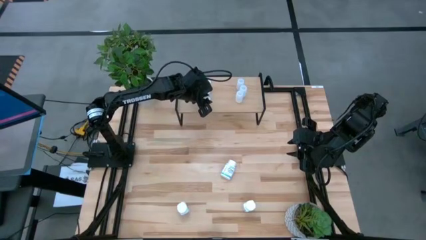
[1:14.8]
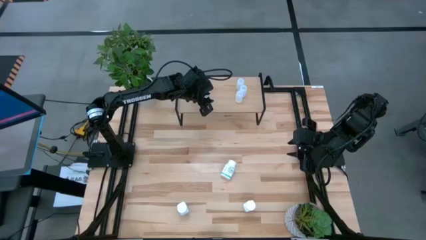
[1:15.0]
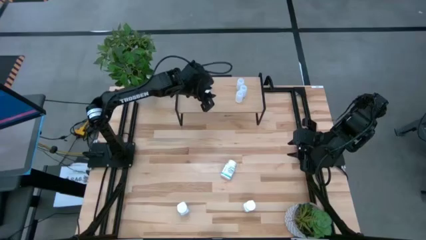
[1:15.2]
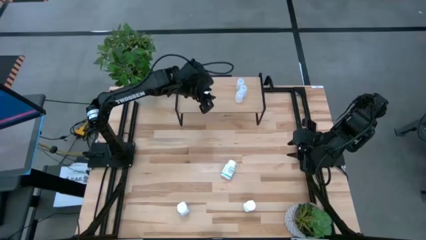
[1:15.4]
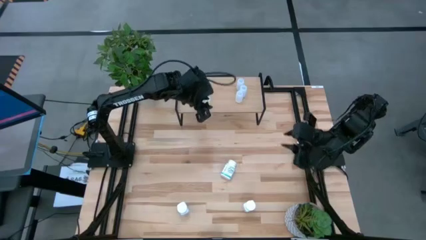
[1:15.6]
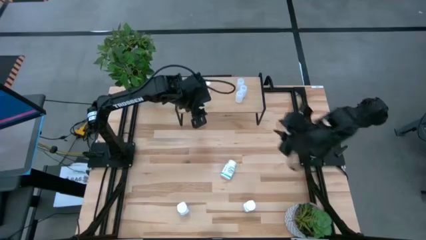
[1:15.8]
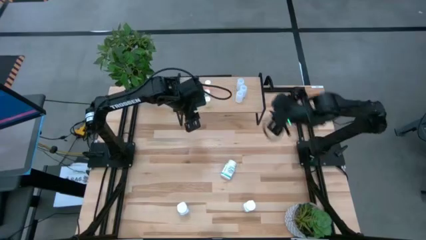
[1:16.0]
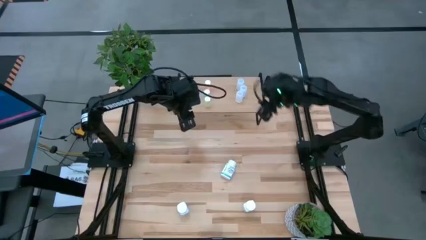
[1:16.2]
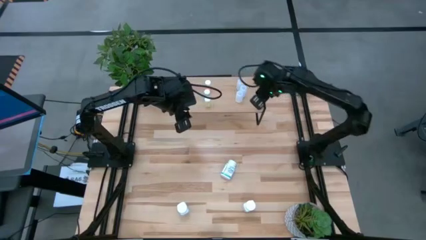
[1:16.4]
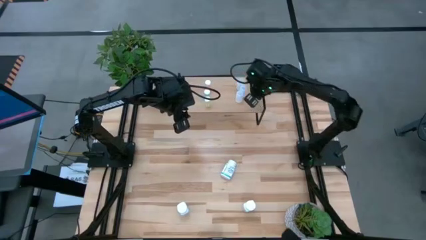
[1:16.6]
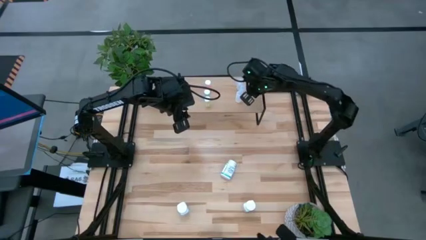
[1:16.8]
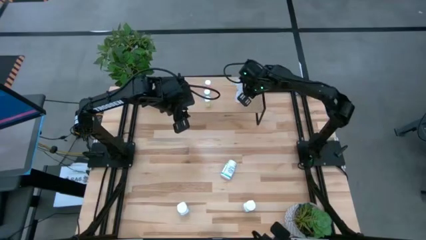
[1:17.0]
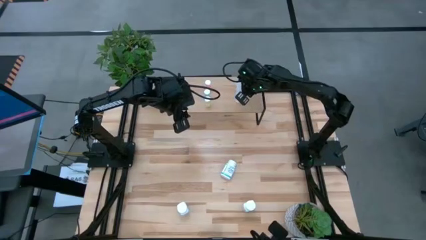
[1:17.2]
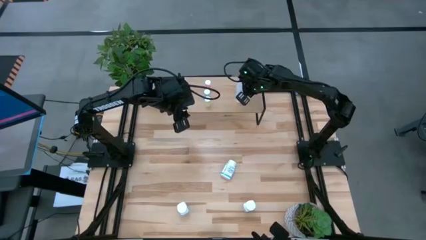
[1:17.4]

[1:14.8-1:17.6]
Task: Pick and place medicine bottles onto shelf by color
Adjust the white pill bottle on the shelf

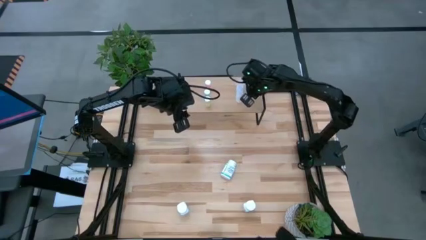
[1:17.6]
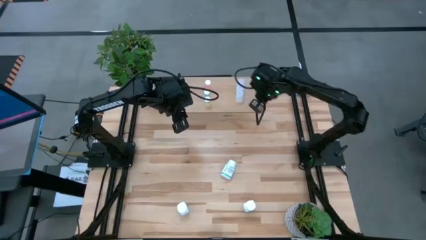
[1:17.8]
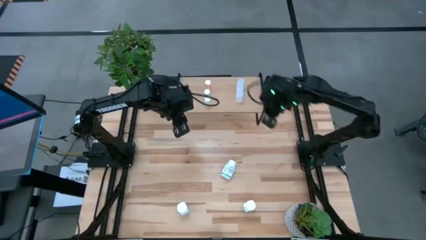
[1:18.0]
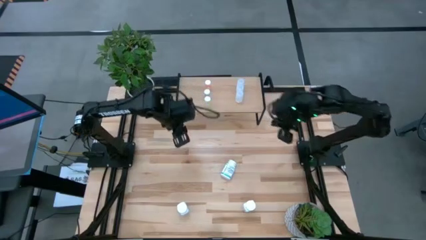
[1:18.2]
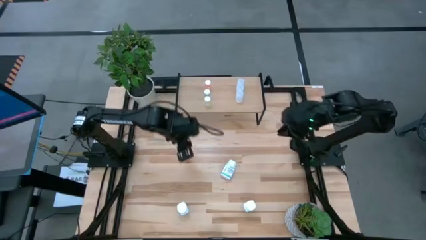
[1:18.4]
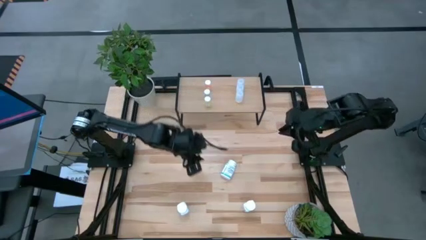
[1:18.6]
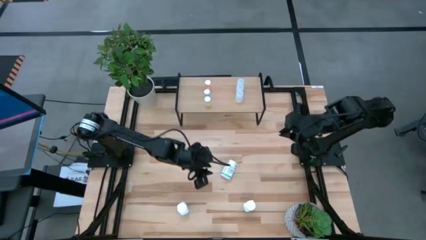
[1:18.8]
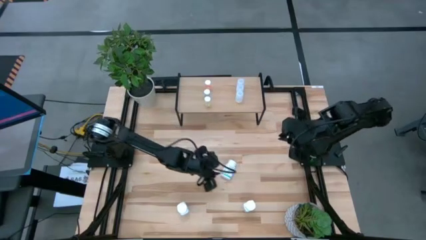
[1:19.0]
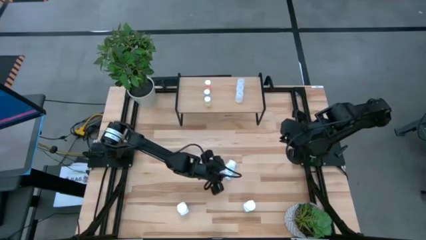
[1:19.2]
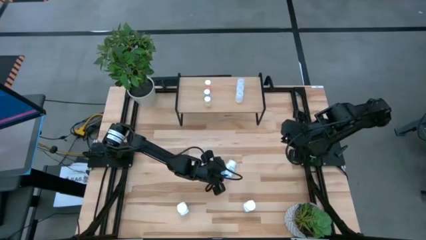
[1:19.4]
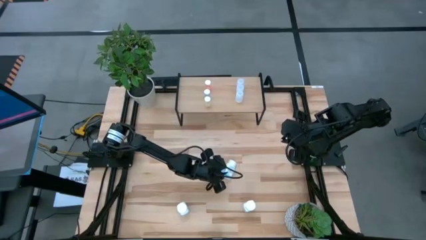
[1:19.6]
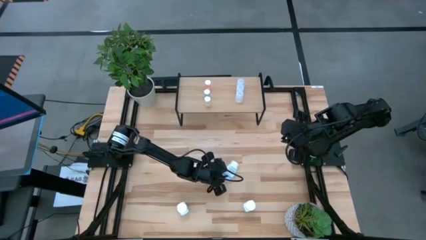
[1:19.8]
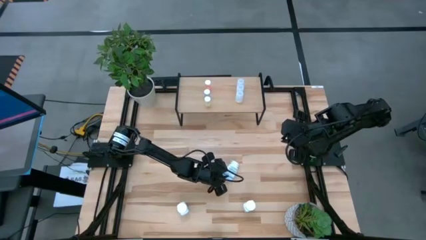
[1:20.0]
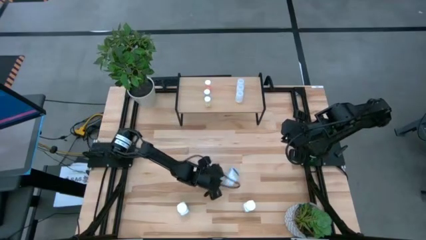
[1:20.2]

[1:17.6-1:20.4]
Put the top white and blue pill bottle on the shelf

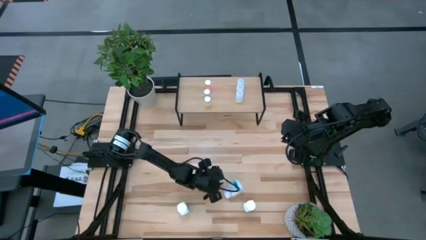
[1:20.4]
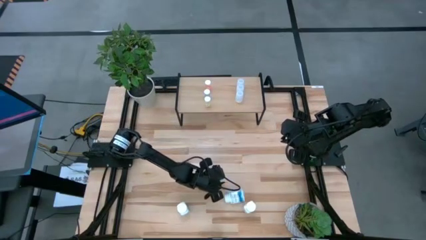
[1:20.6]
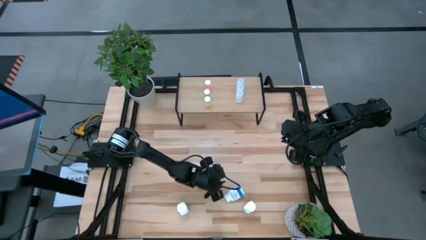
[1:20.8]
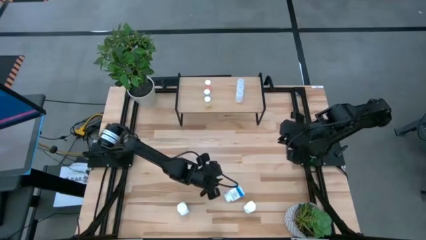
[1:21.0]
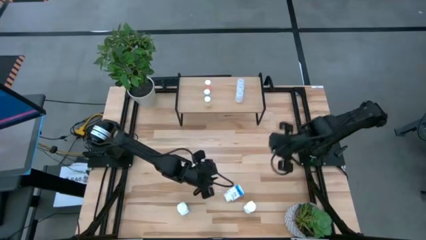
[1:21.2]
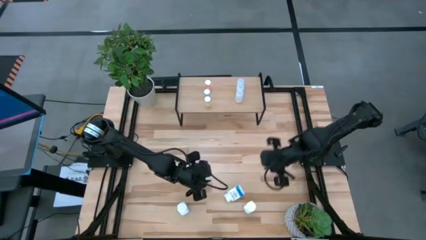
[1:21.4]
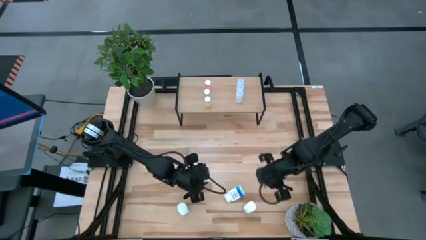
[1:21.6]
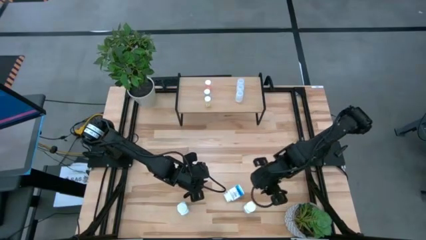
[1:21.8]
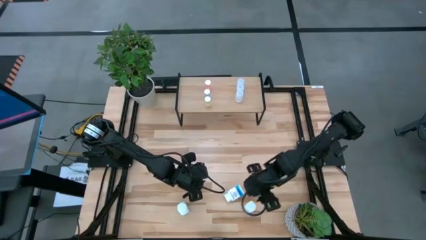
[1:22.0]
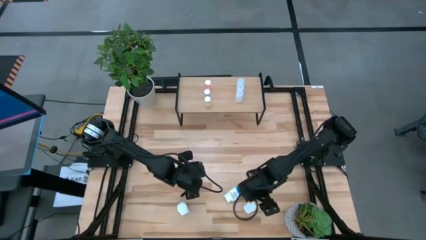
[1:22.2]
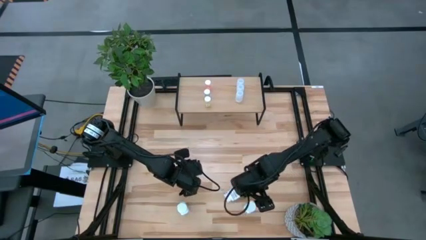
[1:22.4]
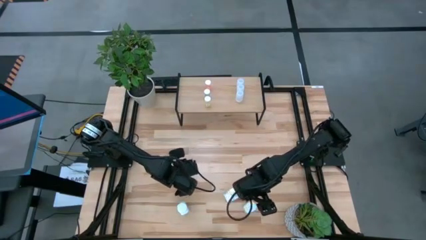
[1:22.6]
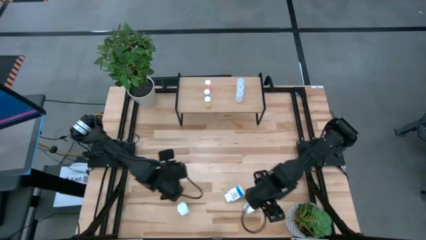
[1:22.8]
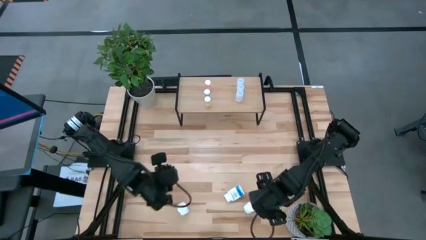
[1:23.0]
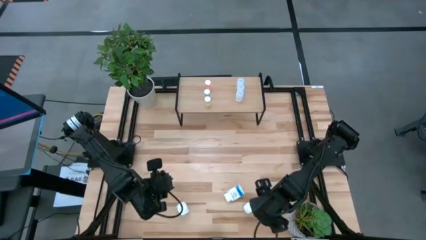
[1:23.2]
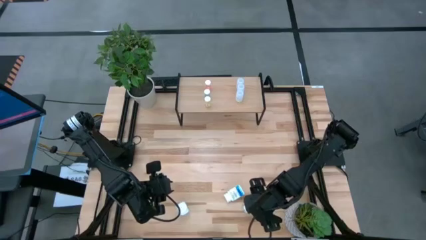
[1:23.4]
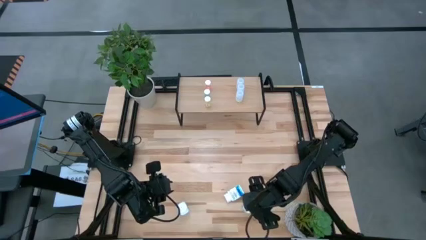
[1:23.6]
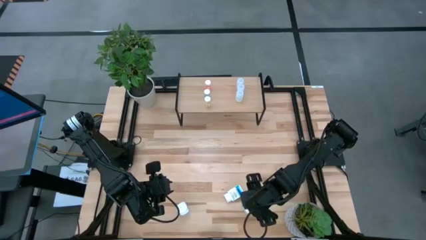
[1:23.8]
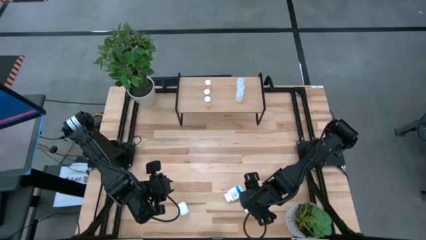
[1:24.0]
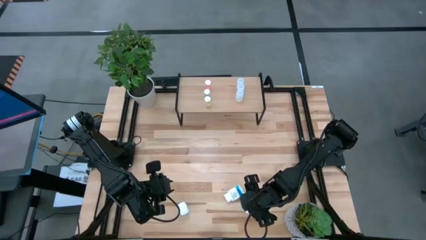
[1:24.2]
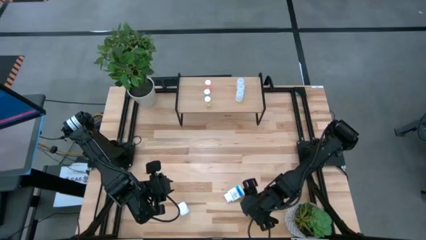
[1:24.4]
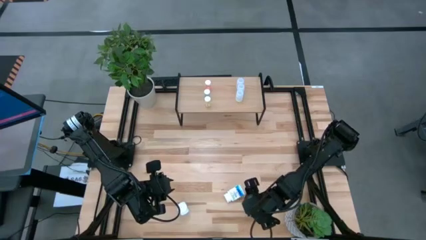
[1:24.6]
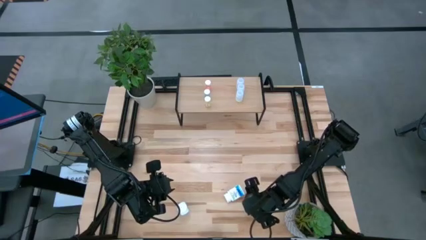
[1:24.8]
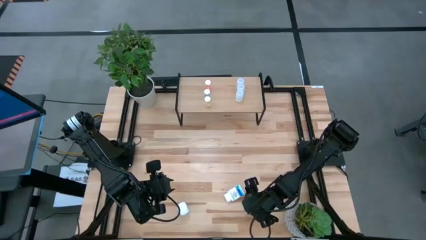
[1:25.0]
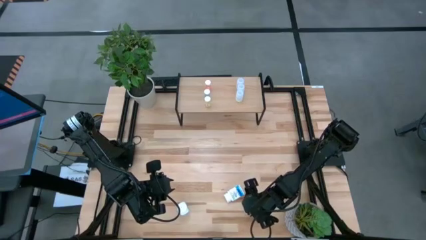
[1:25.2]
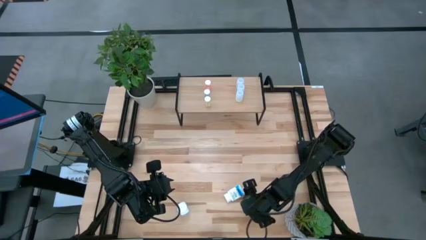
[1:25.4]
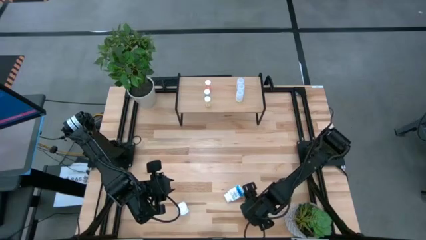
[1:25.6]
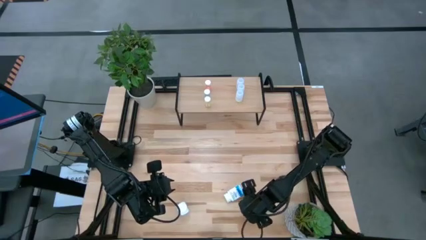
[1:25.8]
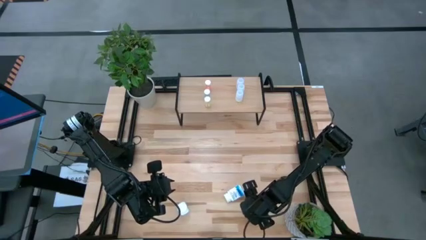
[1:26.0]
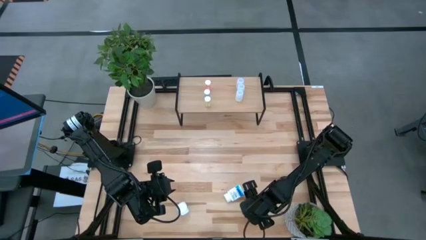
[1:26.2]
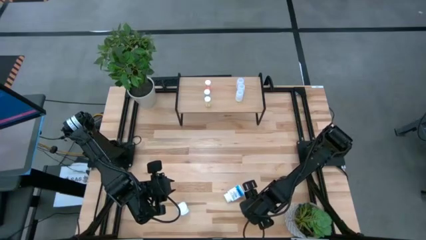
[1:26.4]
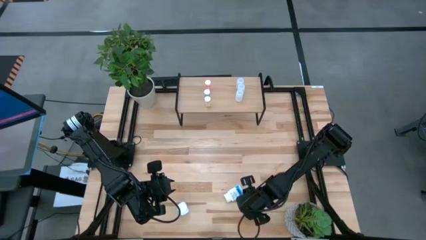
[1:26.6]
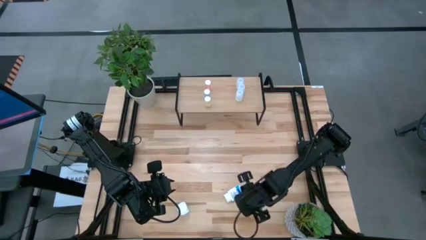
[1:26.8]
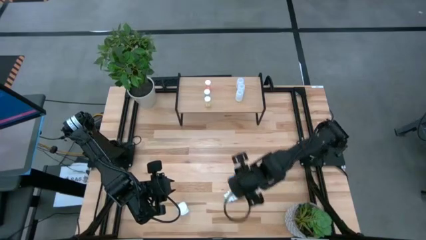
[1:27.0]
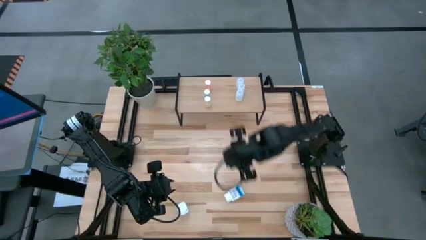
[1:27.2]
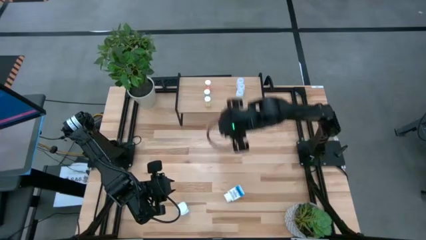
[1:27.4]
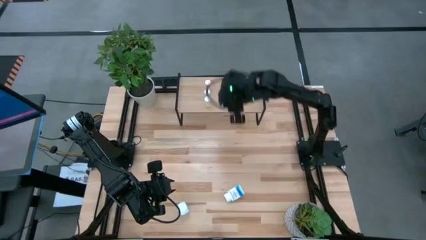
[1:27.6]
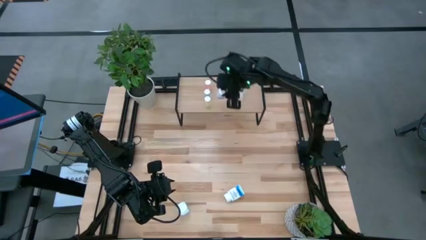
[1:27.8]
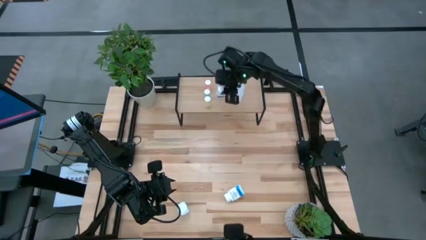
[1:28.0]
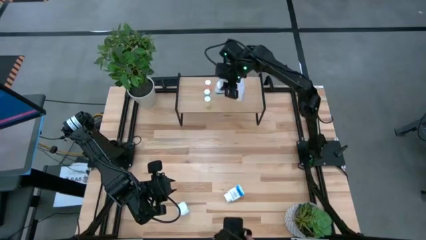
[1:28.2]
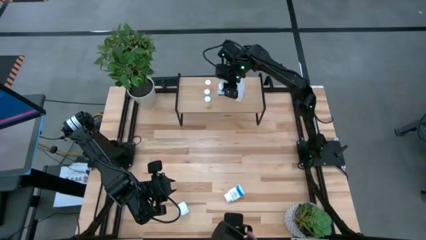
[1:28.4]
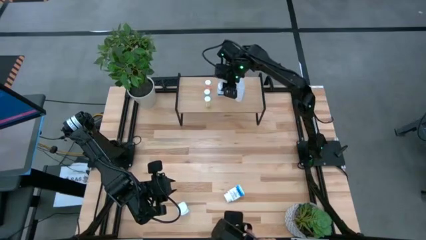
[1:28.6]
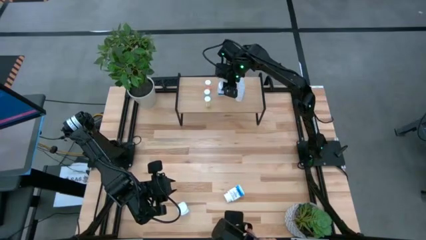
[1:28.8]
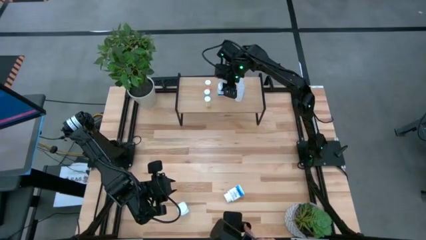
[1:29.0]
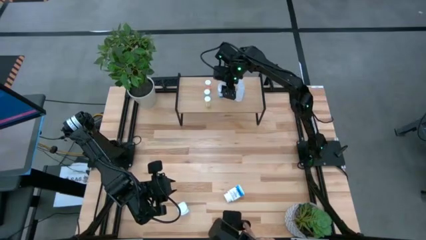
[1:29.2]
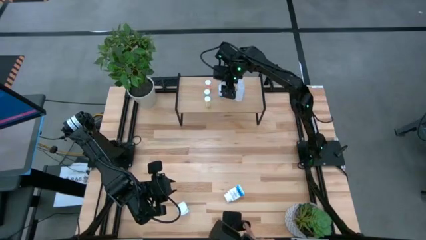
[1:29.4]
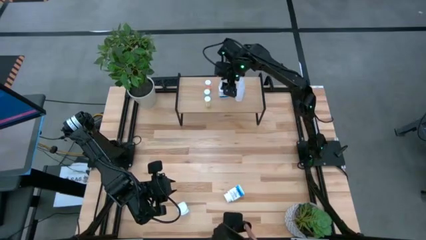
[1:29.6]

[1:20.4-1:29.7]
Put the right white and blue pill bottle on the shelf

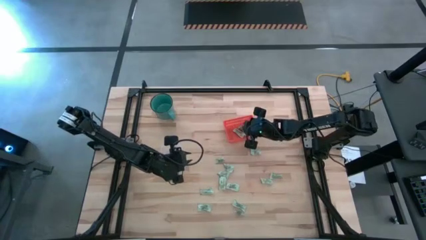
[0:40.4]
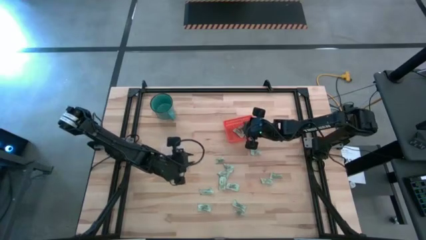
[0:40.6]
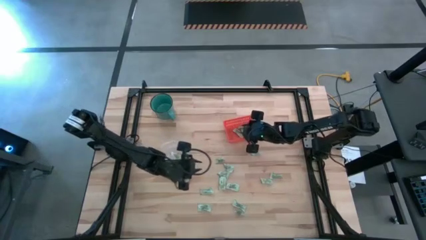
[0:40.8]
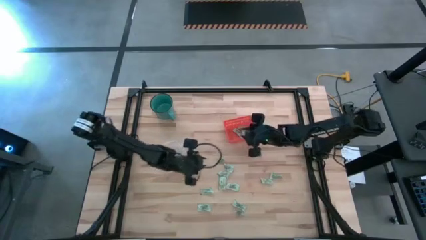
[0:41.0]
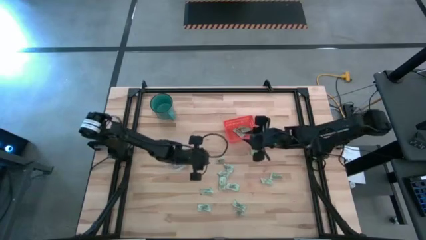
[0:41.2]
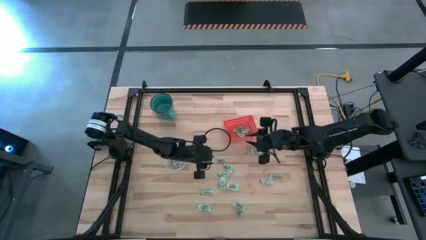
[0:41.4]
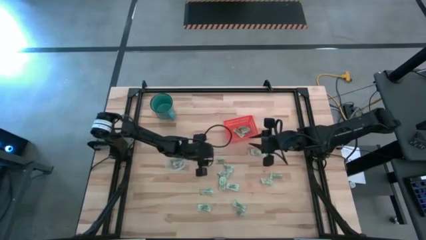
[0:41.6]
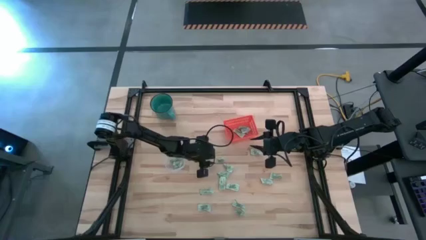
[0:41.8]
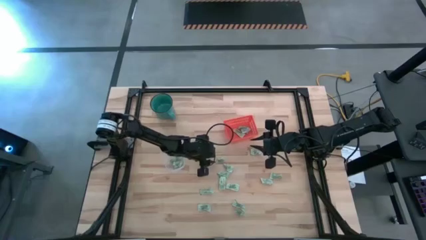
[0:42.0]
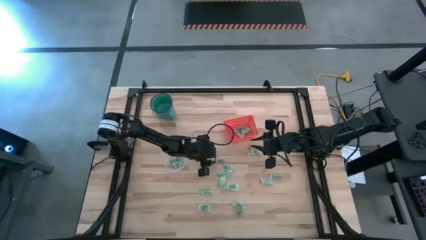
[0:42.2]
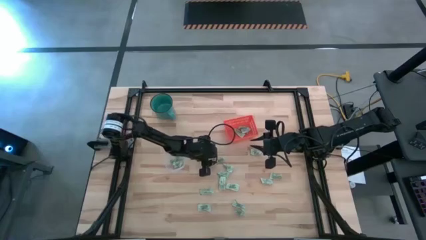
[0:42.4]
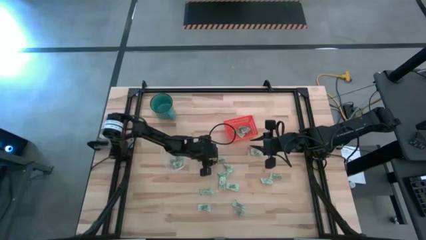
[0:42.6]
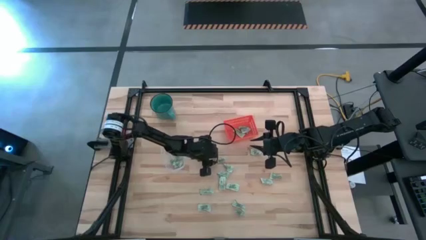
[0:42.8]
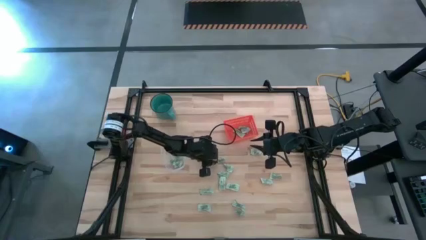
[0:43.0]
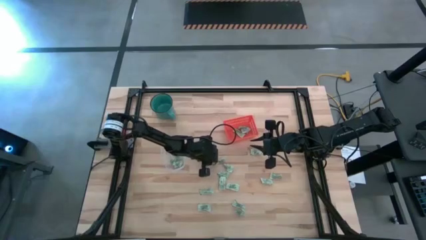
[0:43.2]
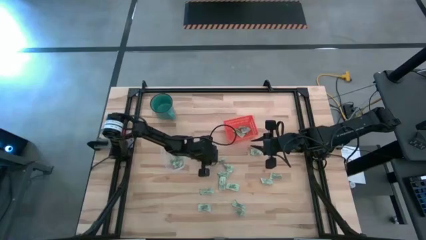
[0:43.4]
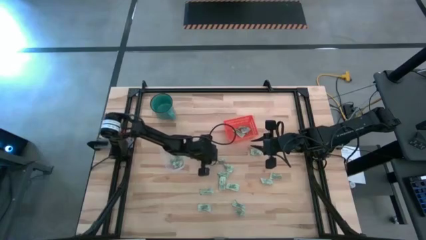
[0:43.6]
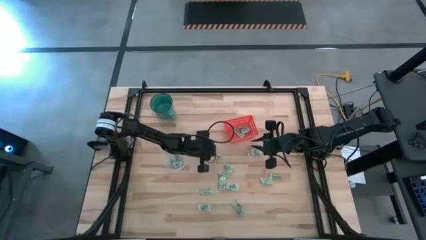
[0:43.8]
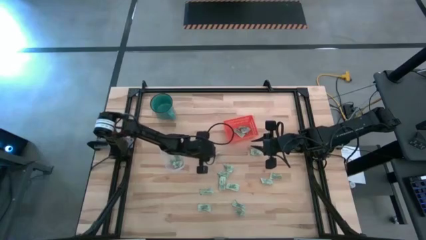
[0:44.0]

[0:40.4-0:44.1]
Task: Pick and place items into bin
Put the light green stevia packet into the transparent container
